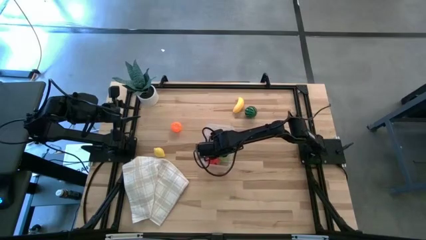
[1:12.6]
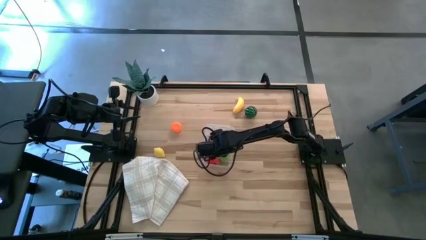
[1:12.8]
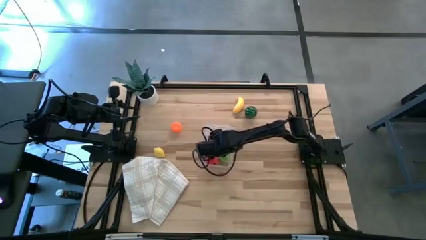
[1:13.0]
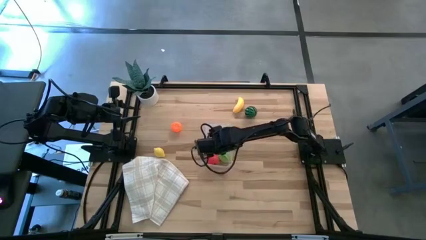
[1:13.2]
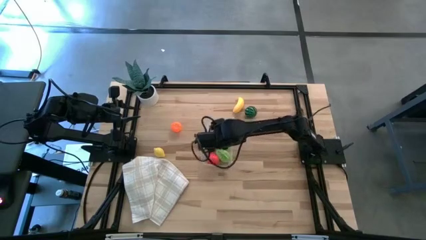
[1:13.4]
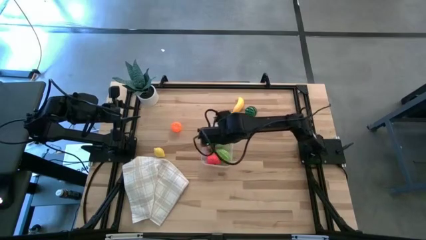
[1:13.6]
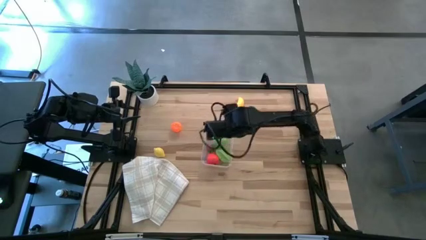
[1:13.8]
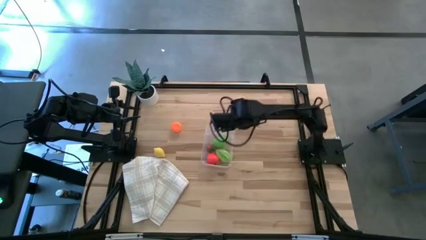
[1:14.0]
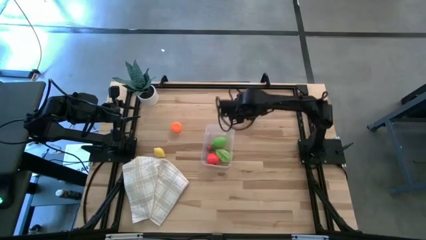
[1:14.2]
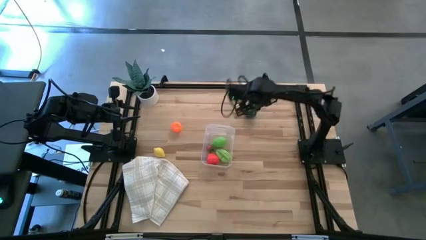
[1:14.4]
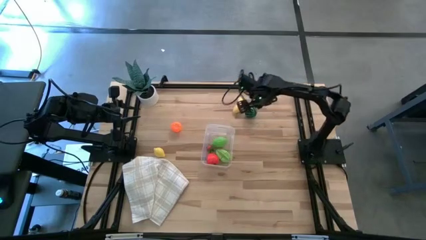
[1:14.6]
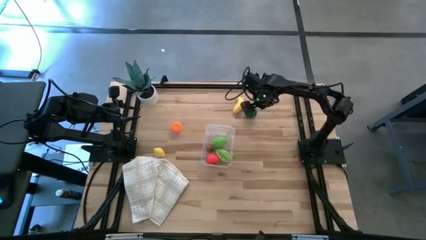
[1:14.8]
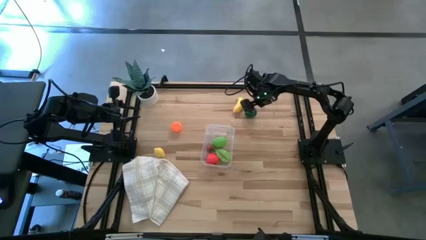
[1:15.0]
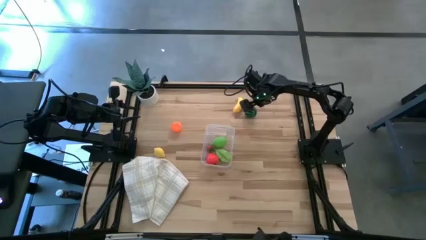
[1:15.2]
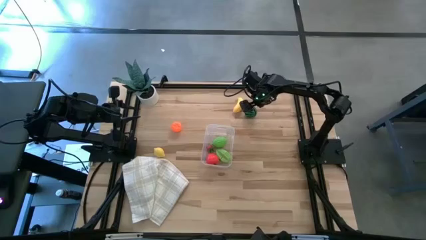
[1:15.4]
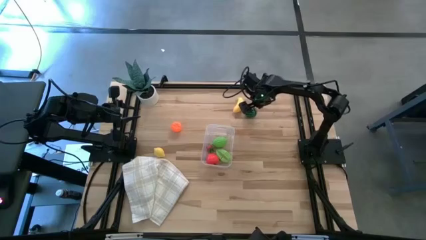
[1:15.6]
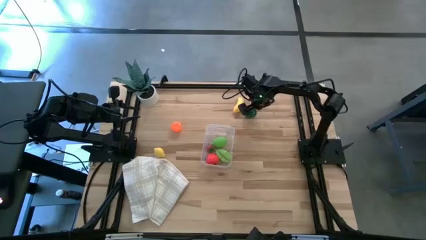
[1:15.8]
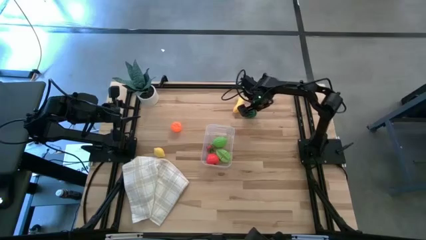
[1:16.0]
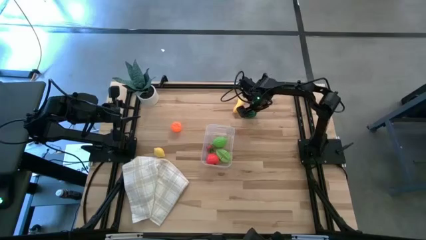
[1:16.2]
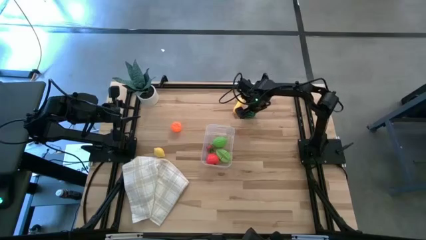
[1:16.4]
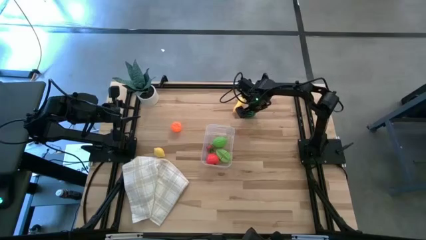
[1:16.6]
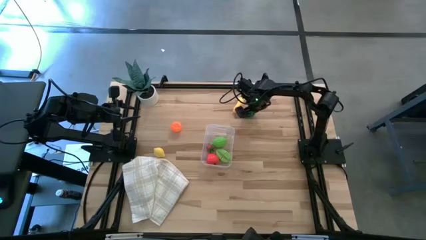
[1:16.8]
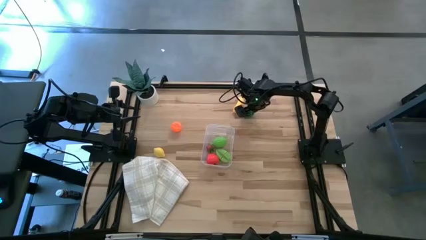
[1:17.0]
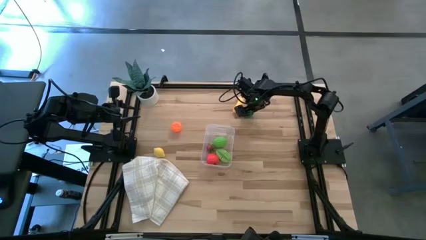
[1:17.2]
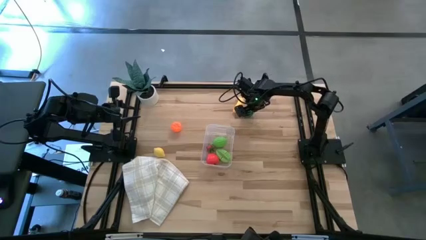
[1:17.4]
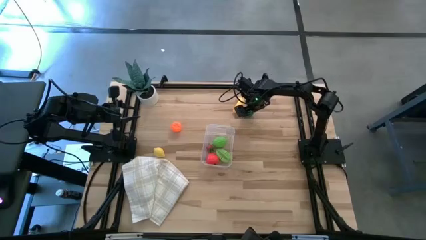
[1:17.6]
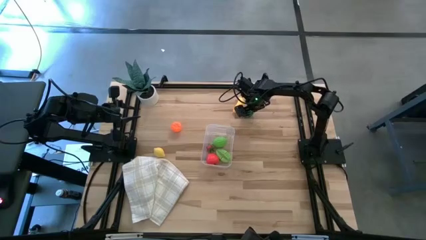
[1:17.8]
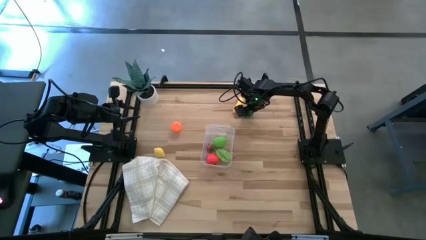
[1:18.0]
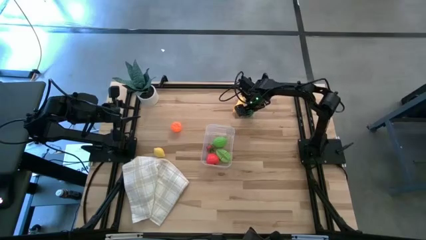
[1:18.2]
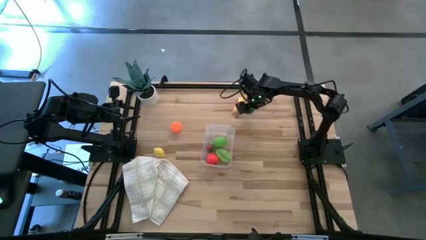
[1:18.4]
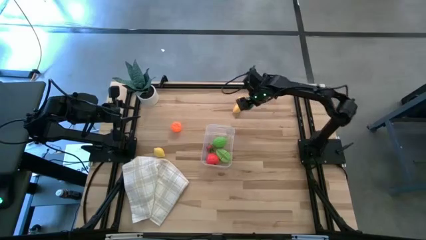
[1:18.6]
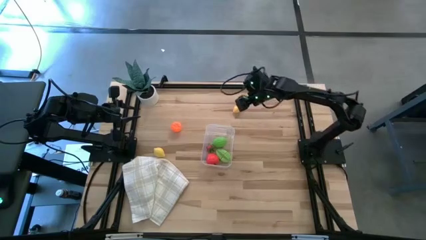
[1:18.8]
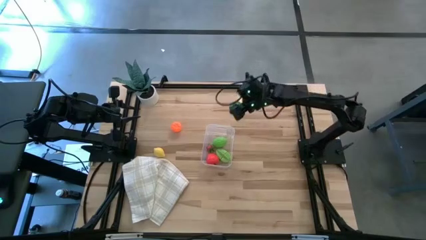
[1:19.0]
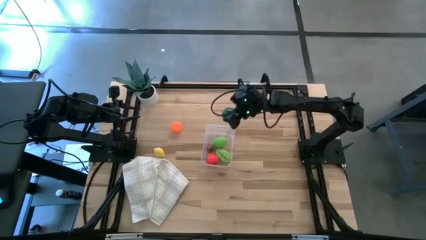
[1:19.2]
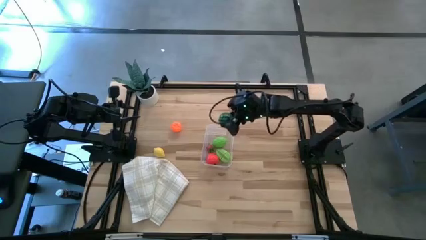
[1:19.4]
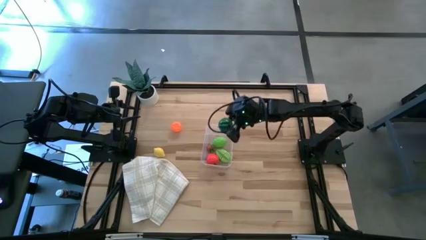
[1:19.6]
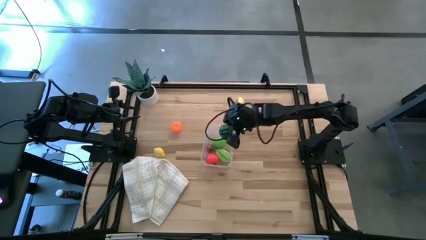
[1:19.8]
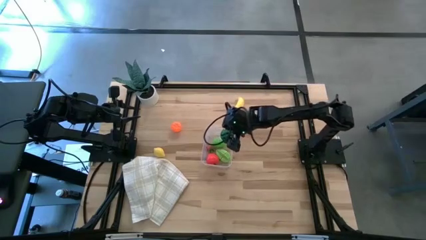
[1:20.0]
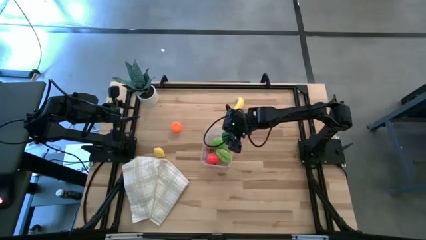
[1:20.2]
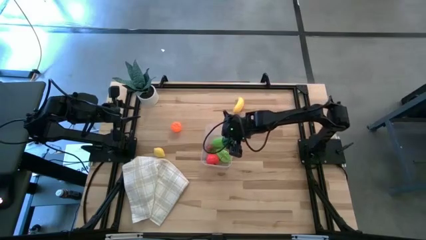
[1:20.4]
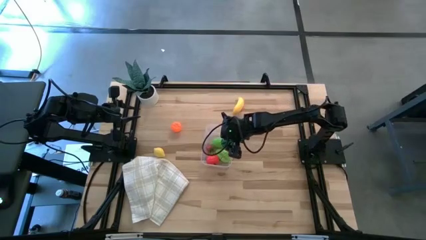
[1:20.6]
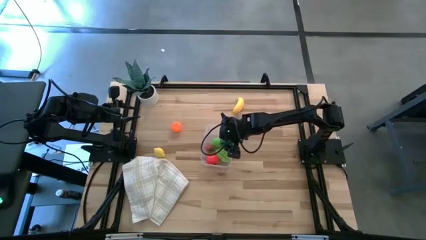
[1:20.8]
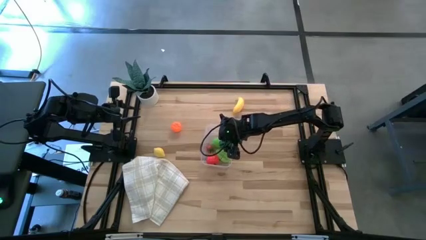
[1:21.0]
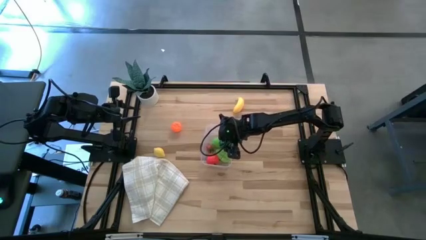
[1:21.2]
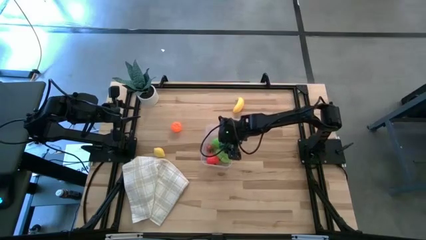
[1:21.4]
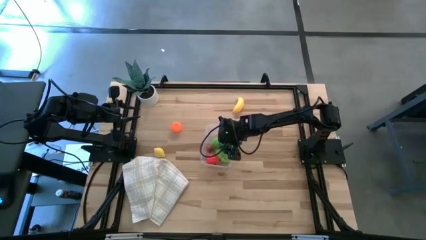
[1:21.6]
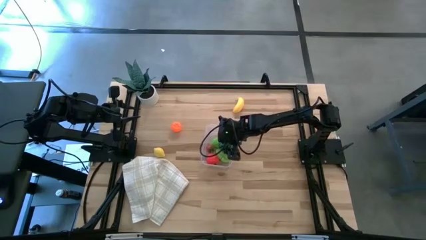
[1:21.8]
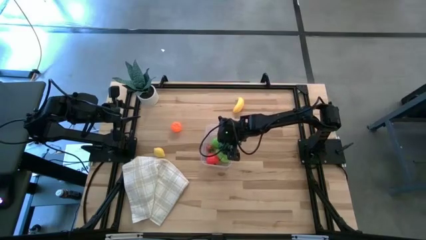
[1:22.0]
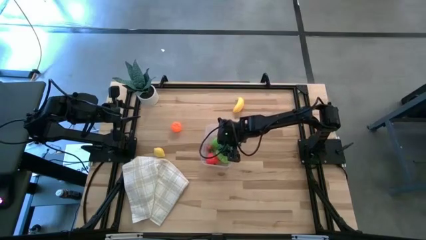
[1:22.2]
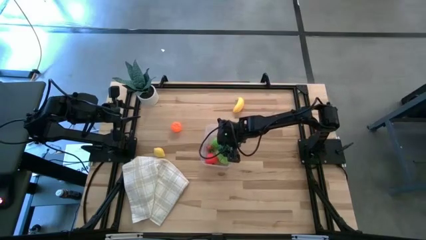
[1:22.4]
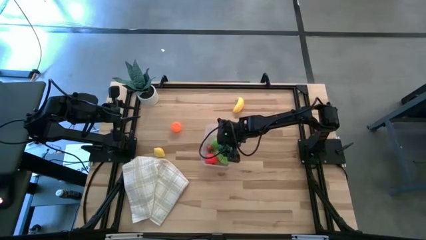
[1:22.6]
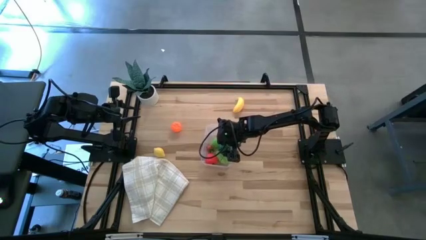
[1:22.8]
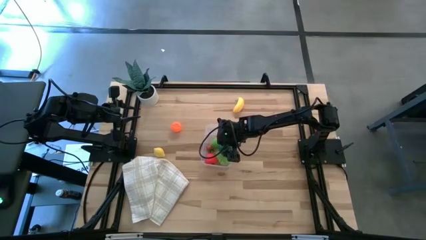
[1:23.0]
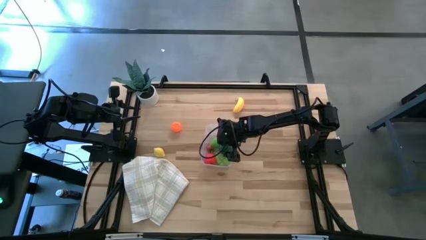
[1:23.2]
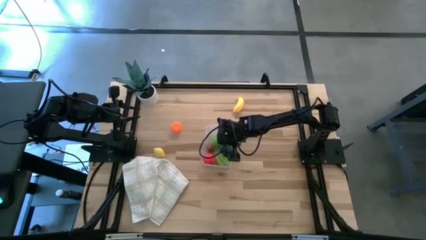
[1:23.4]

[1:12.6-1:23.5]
Task: Pick and placing Produce into tupperware
Put the watermelon into the transparent bin

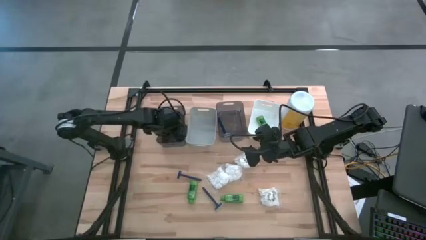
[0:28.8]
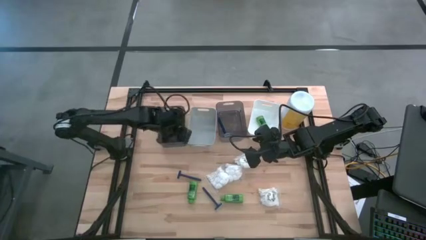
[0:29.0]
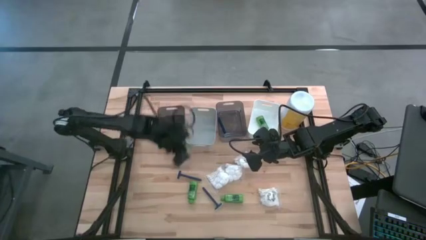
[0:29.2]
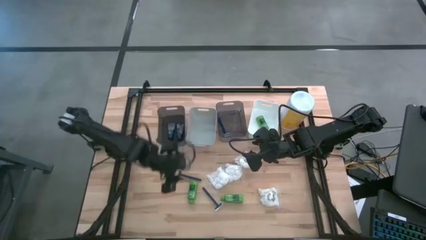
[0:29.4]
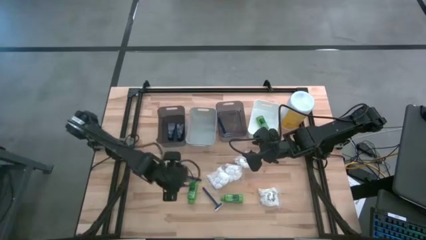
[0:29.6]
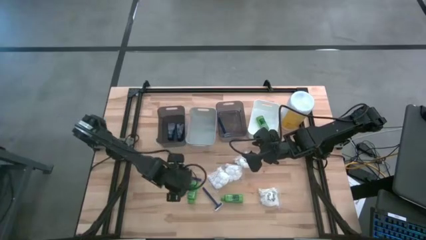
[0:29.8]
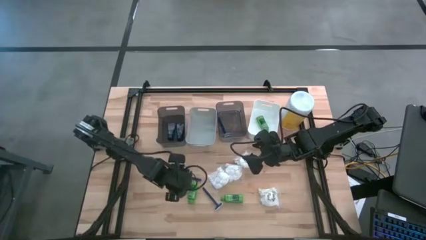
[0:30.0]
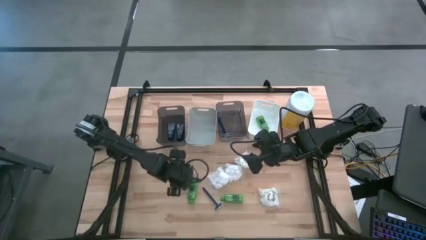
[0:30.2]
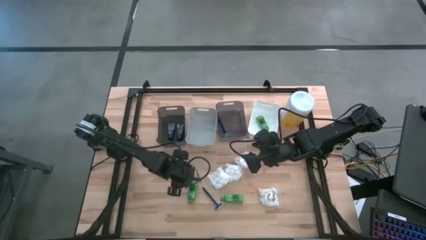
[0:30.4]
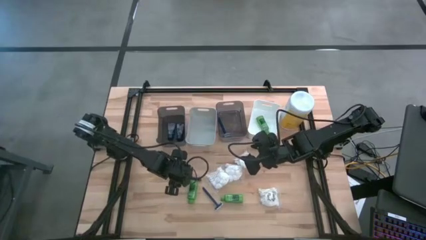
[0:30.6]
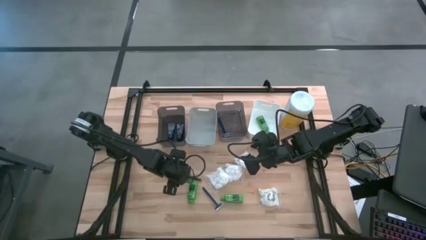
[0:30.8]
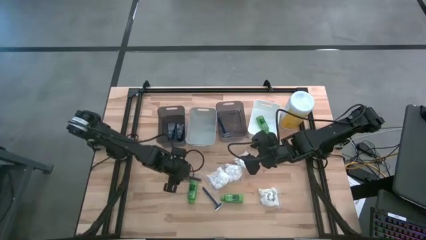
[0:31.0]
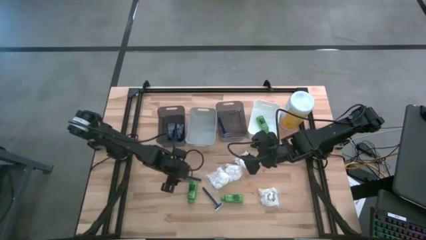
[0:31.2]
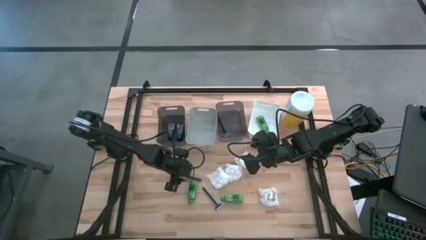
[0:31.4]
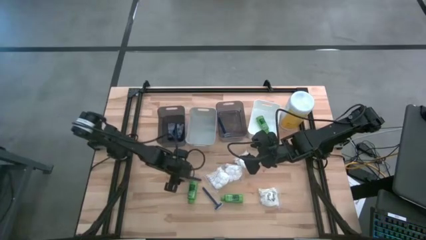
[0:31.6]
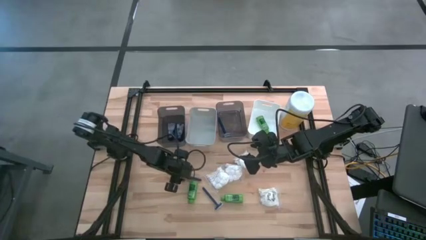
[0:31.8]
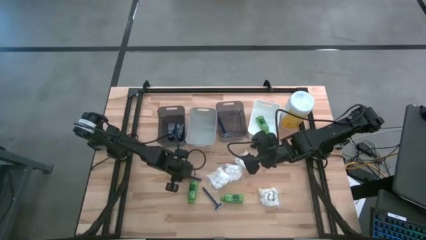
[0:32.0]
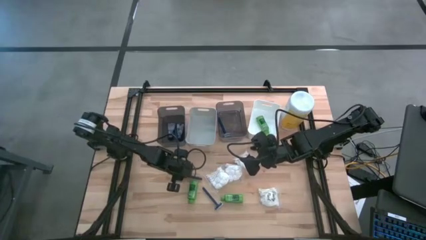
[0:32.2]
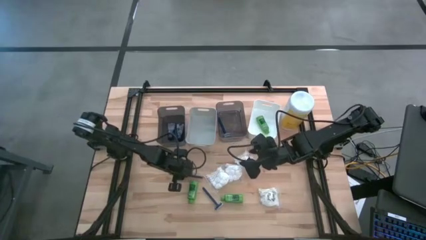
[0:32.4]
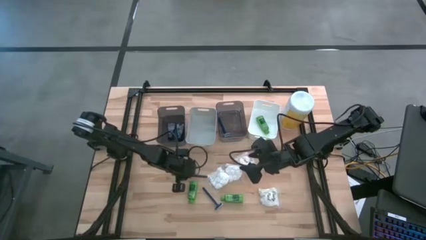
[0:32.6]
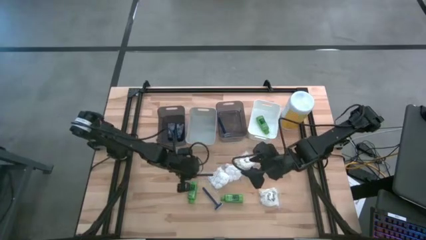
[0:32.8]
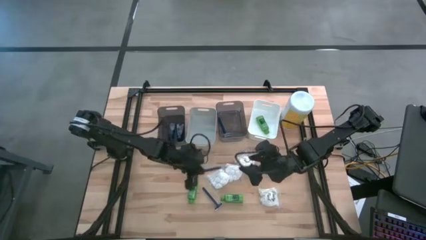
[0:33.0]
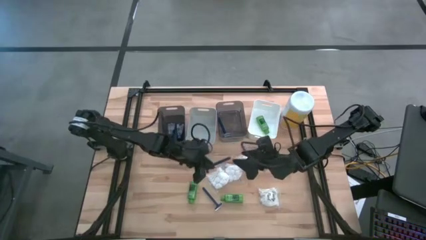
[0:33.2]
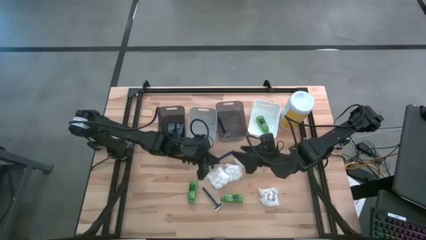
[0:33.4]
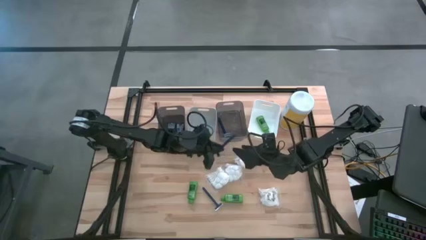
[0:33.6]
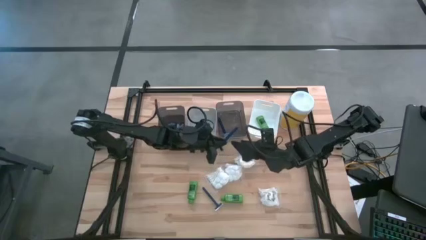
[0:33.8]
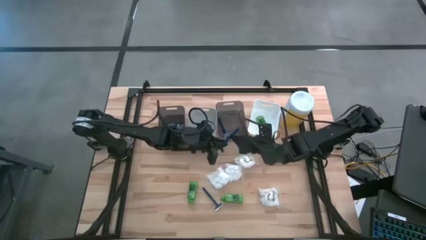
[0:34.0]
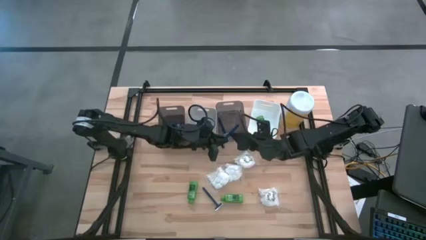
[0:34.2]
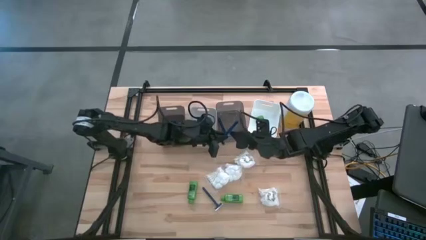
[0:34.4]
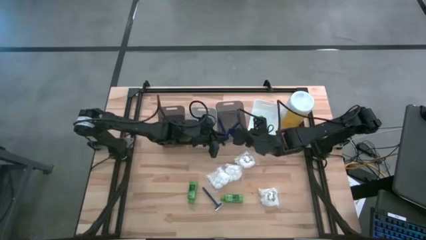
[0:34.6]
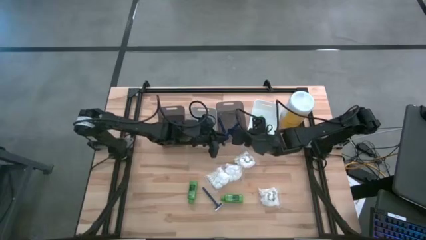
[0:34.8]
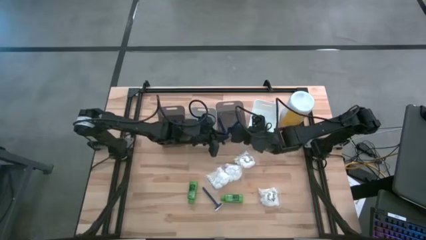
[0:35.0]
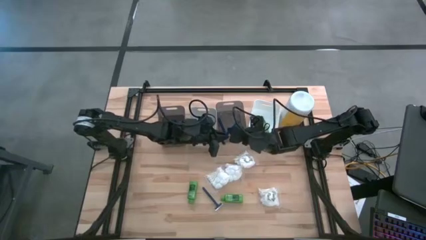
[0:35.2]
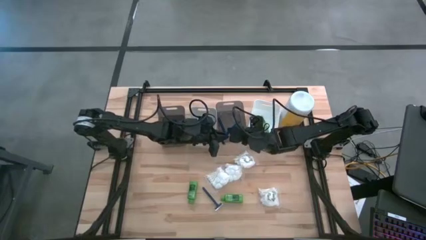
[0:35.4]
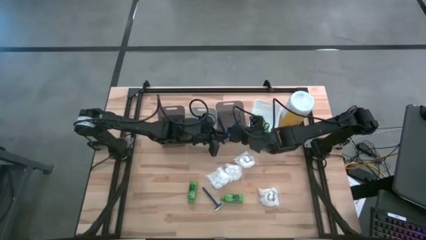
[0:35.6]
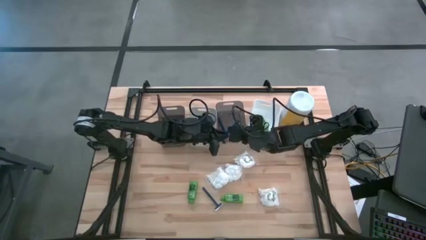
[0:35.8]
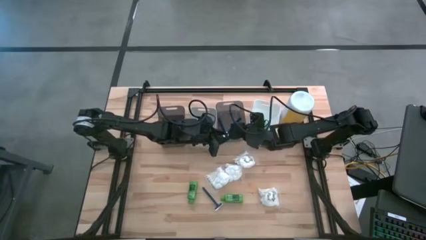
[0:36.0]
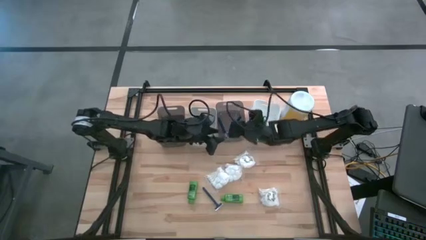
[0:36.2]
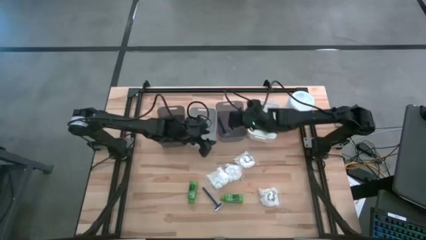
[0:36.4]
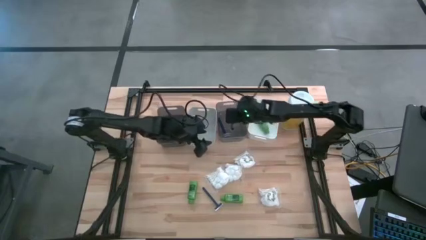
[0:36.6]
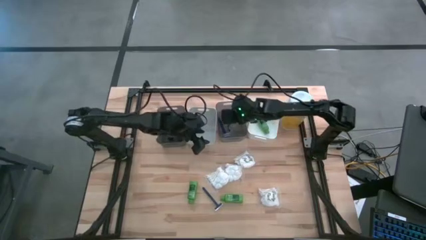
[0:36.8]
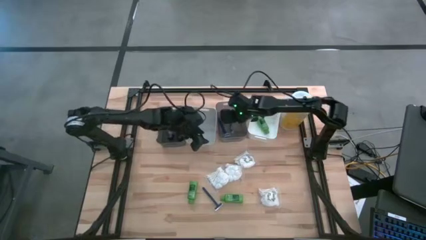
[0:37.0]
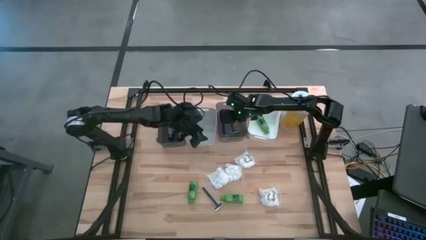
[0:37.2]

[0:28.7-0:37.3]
Task: Pick & Place Travel size toiletries
Put the blue razor into the right black bin
